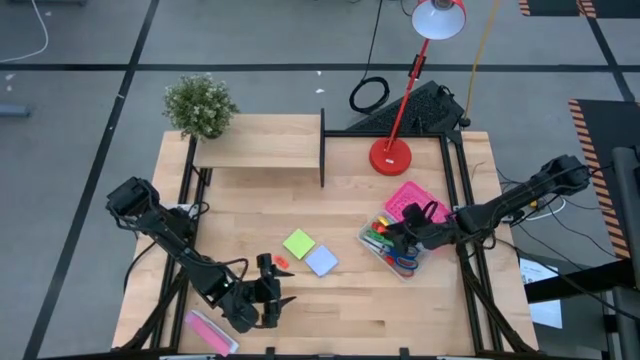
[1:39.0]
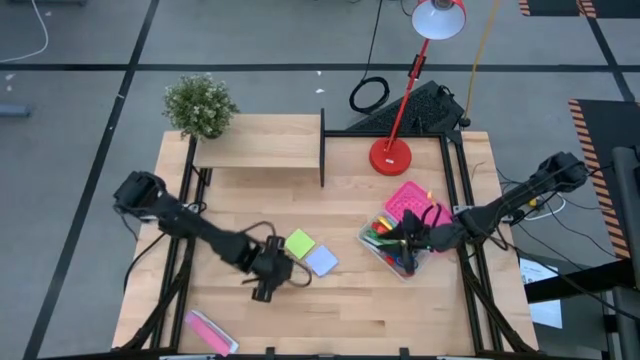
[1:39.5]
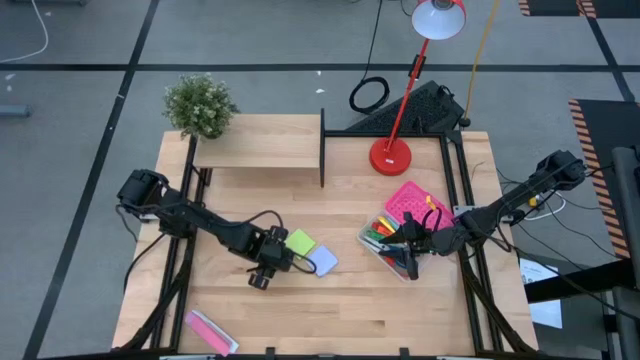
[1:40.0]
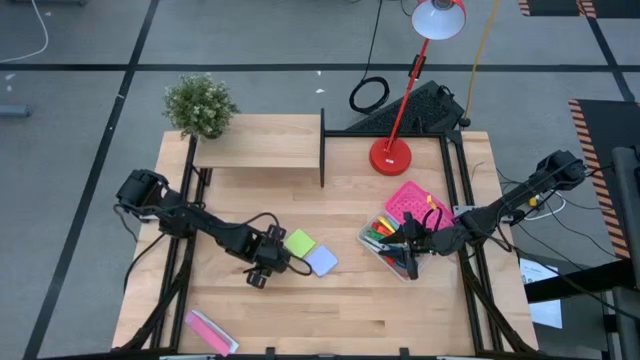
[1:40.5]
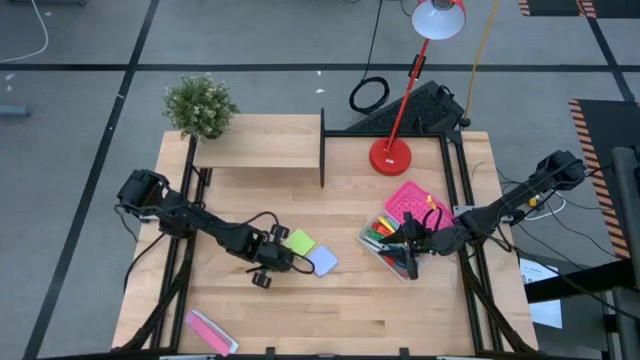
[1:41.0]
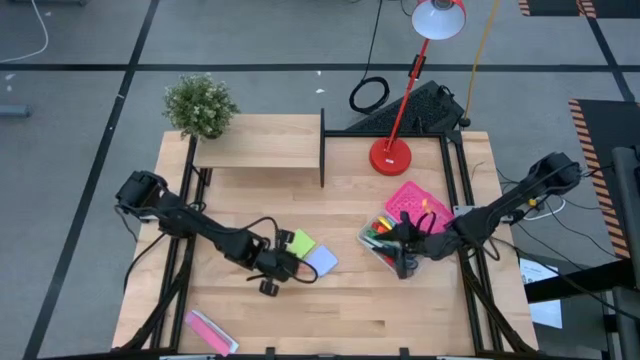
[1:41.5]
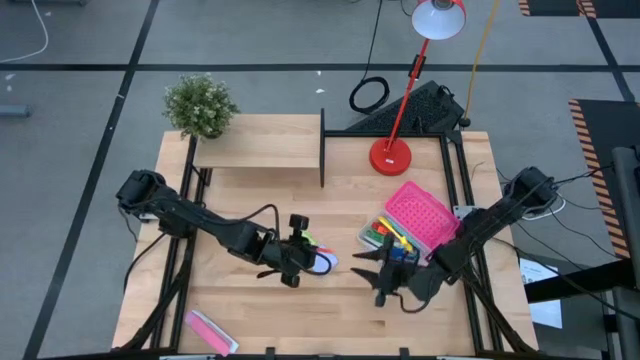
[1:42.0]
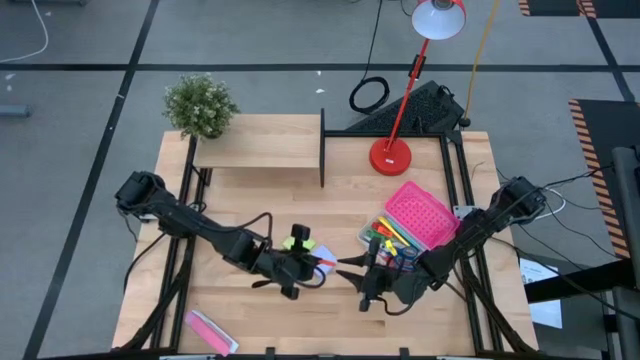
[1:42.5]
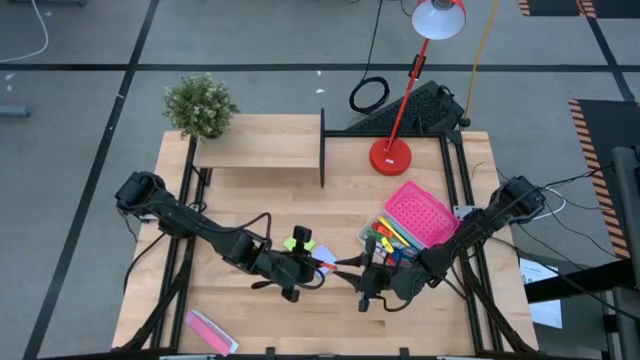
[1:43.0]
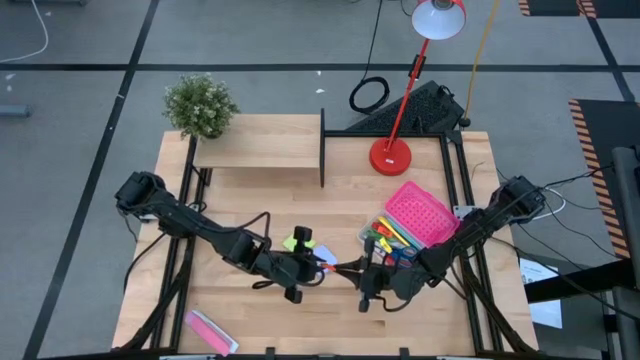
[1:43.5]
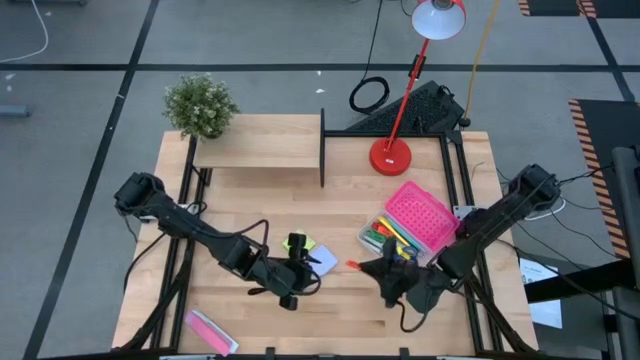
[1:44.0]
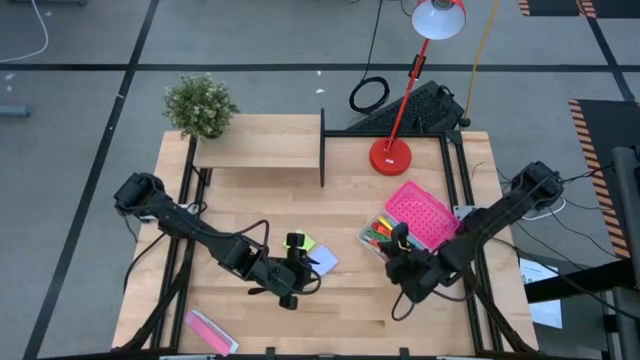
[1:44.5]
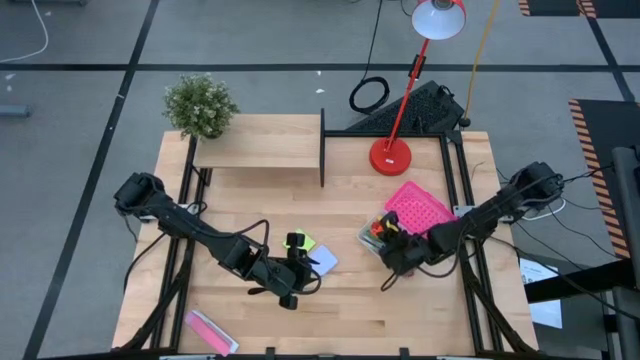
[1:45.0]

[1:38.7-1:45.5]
Task: Pack school essentials
Put the orange eraser into the pink supply box

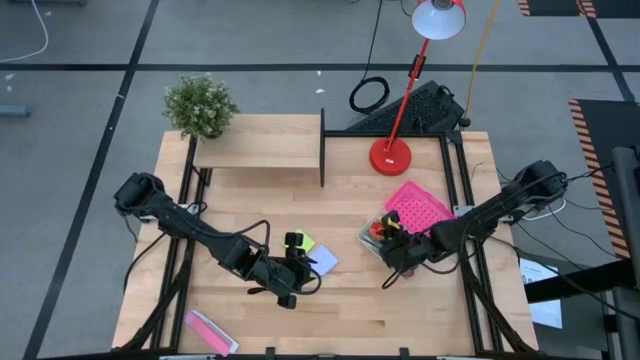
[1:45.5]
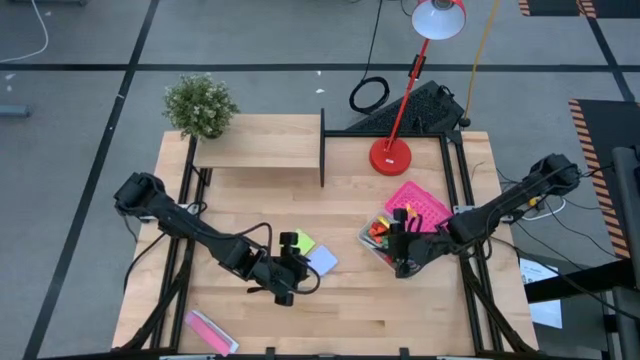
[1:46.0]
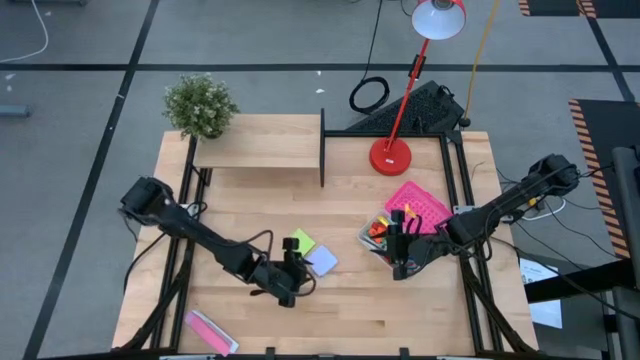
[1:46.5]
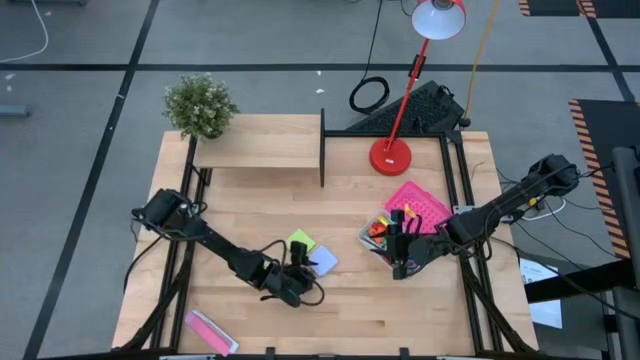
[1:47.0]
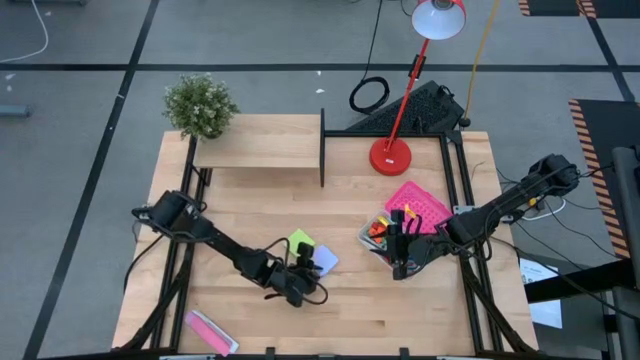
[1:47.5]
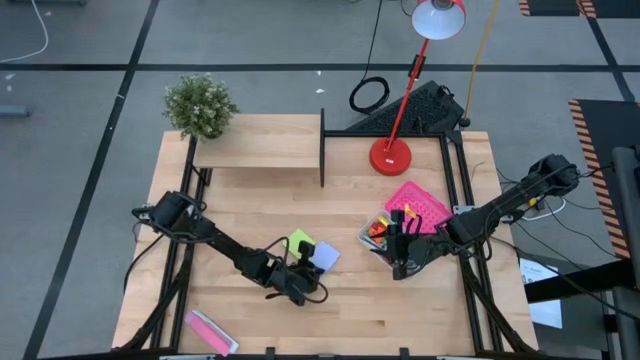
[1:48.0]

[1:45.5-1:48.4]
Put the purple sticky notes into the pink supply box

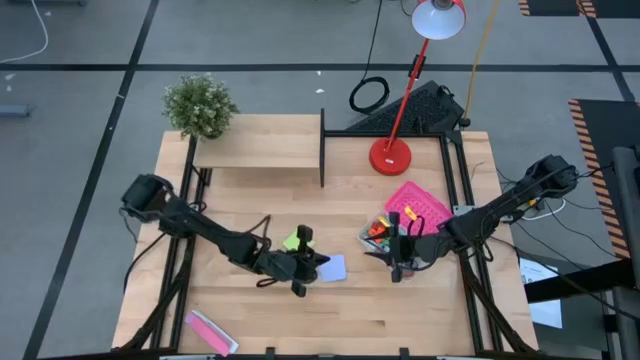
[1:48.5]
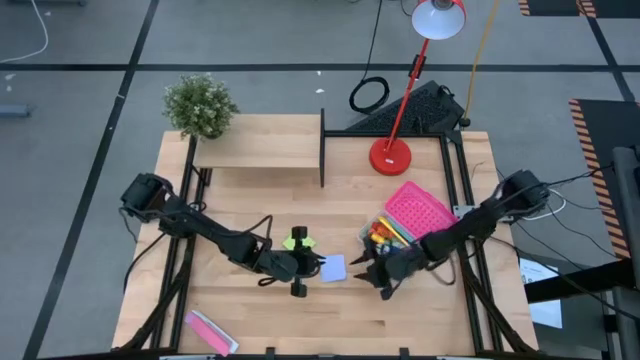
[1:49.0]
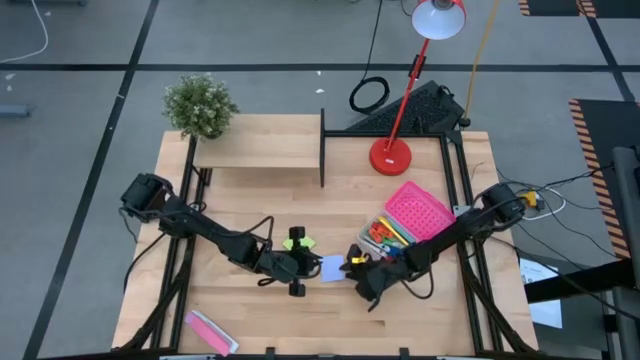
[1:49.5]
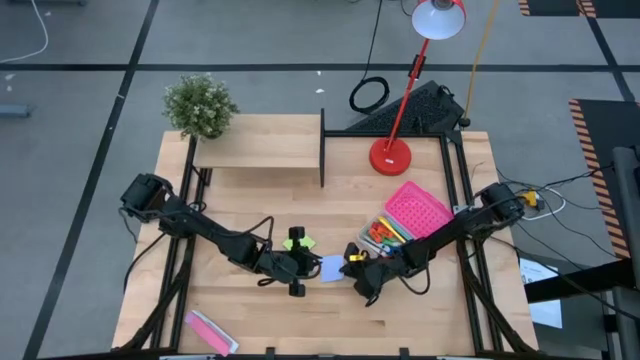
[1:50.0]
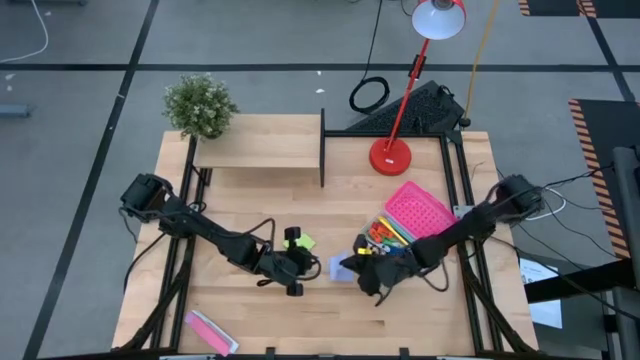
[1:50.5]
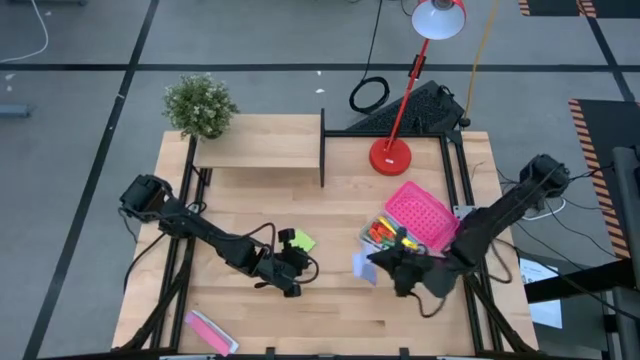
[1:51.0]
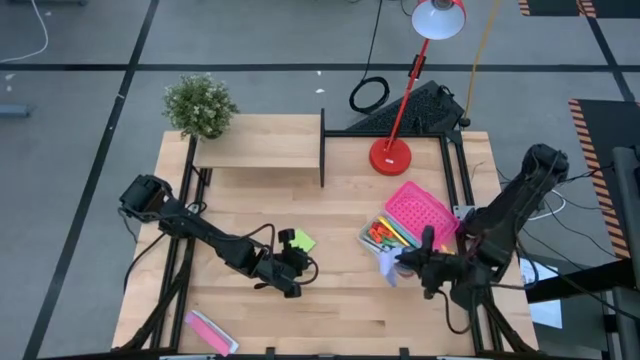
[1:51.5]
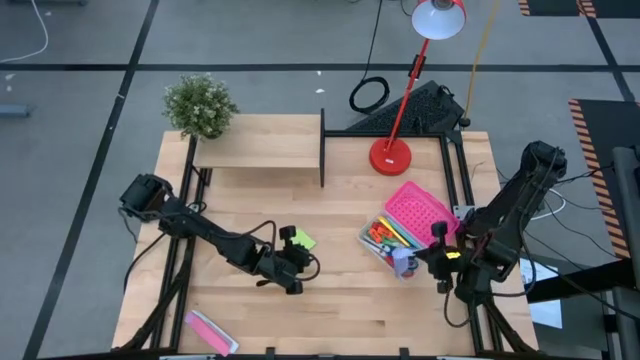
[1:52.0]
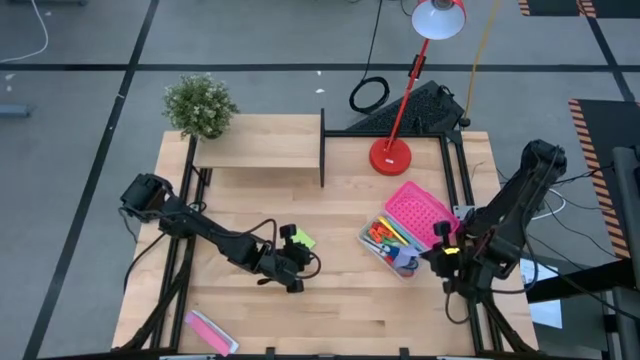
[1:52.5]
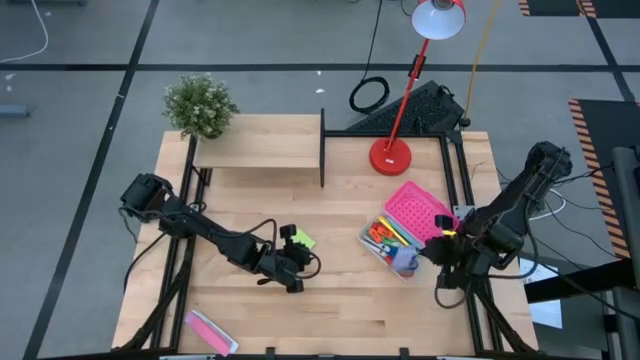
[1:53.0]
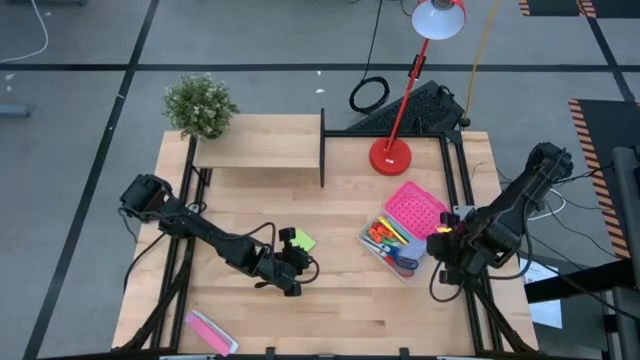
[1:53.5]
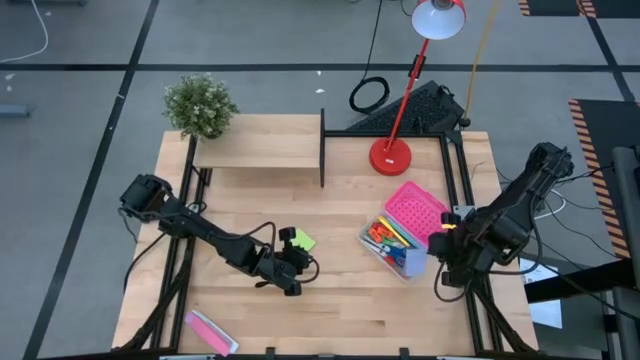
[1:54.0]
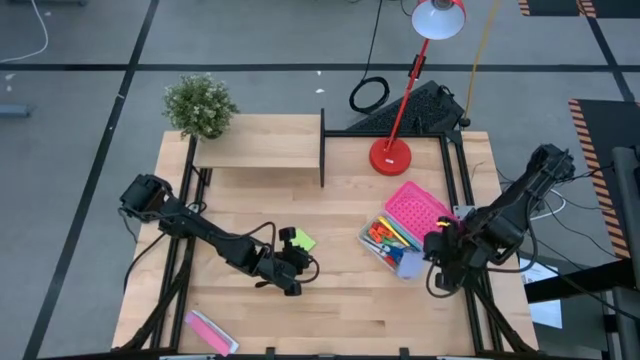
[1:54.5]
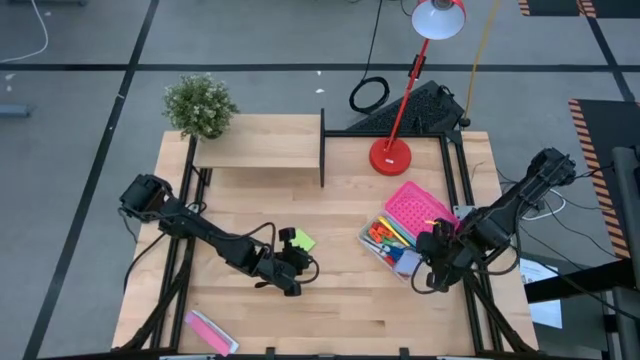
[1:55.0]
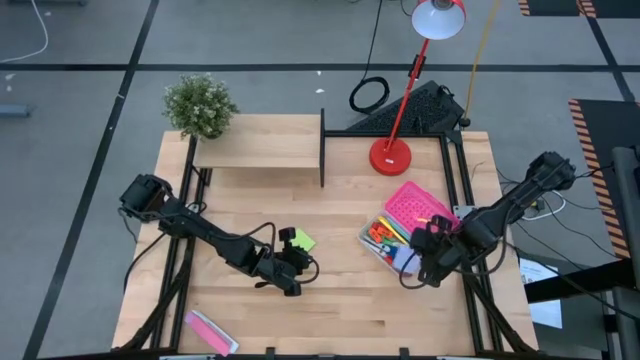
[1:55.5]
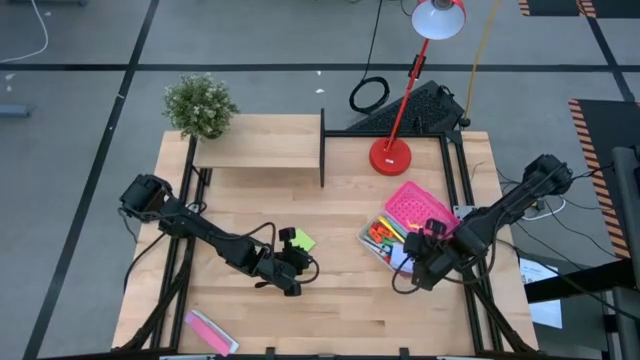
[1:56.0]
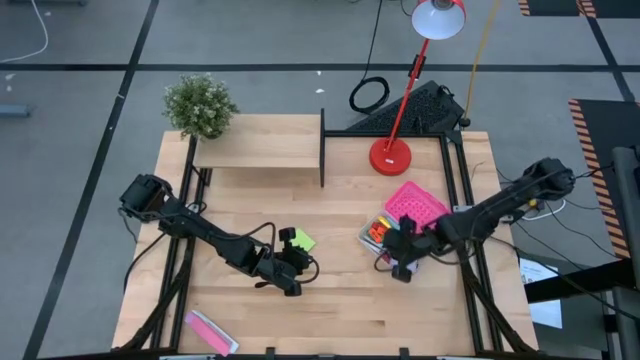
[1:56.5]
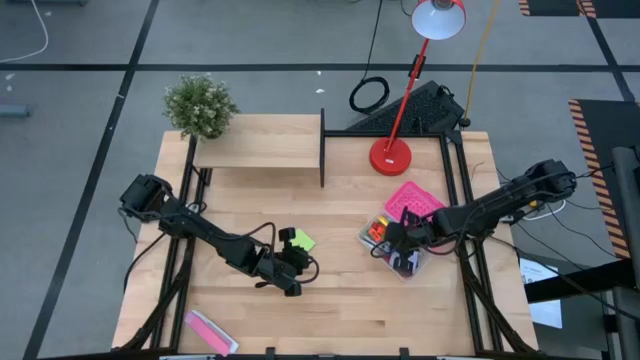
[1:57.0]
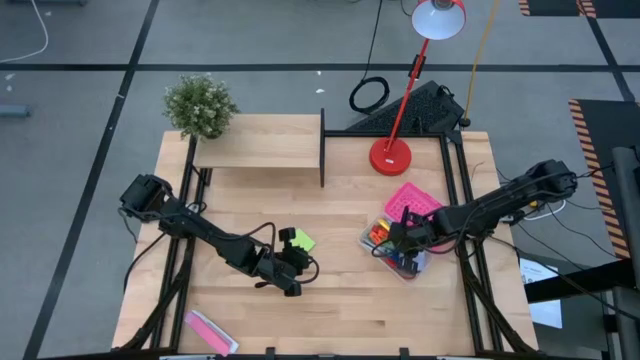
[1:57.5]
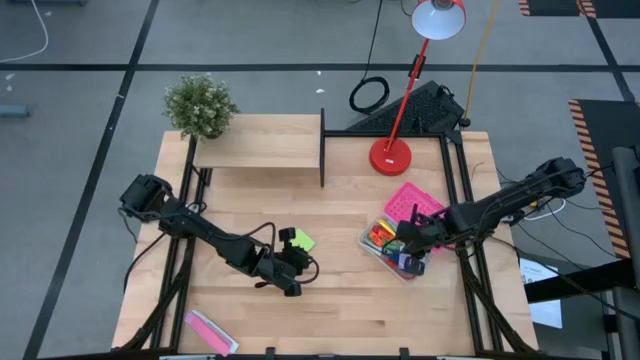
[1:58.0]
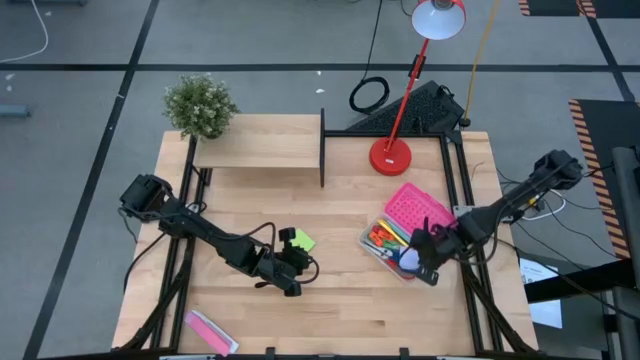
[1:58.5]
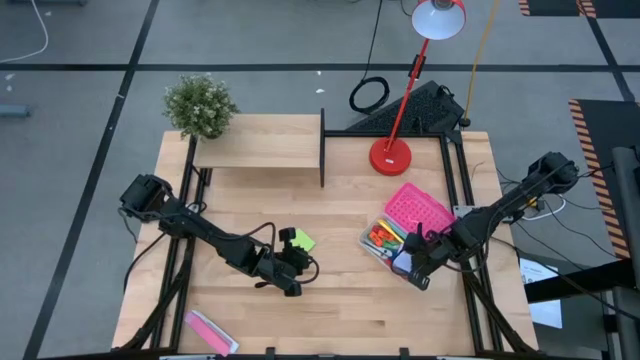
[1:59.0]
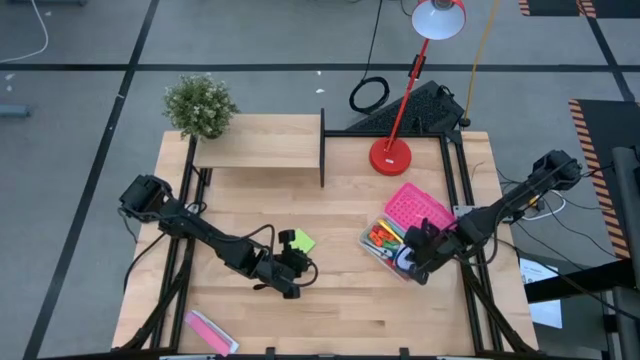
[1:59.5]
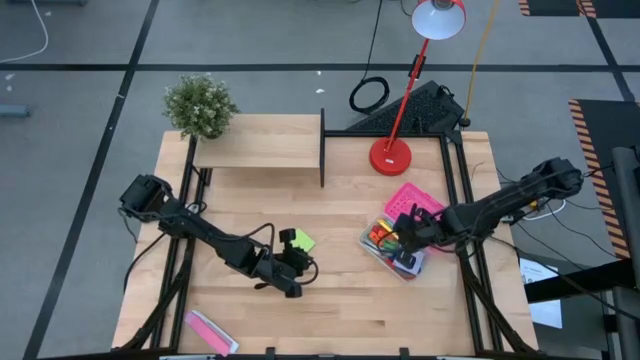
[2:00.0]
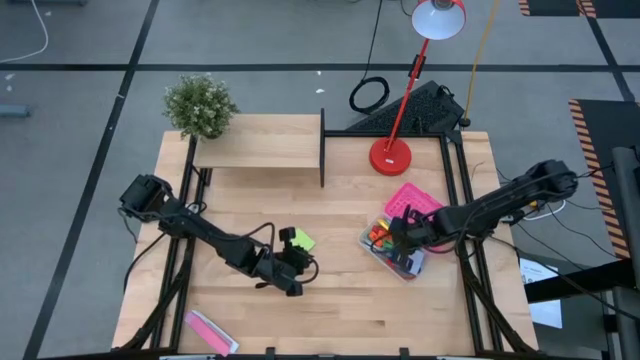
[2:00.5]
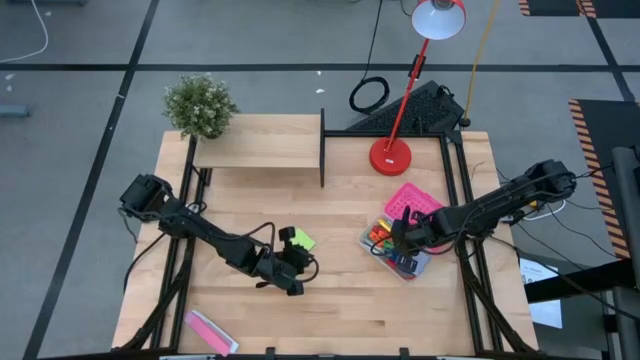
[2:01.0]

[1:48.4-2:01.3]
Put the purple sticky notes into the pink supply box
